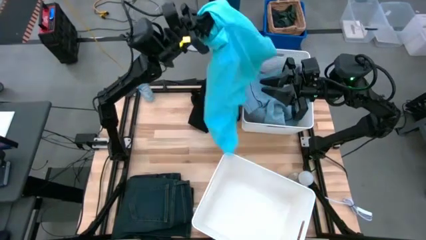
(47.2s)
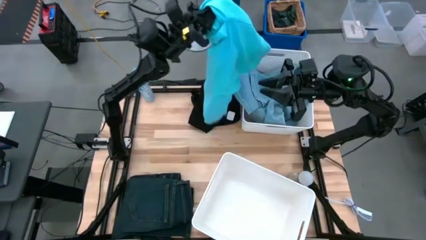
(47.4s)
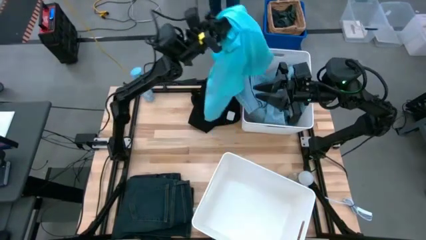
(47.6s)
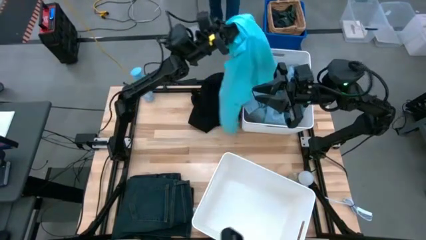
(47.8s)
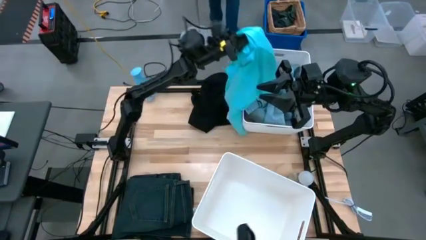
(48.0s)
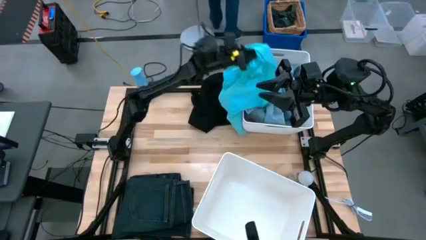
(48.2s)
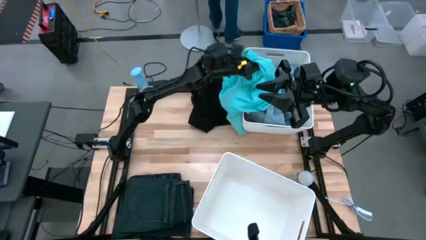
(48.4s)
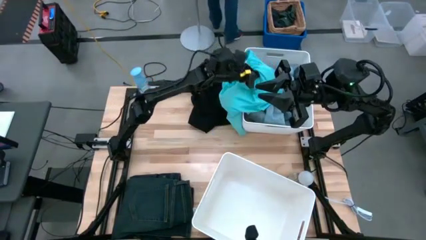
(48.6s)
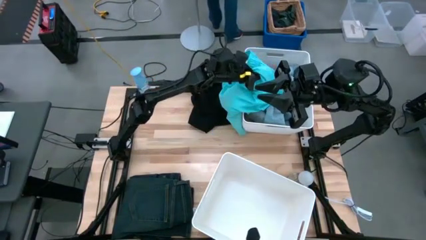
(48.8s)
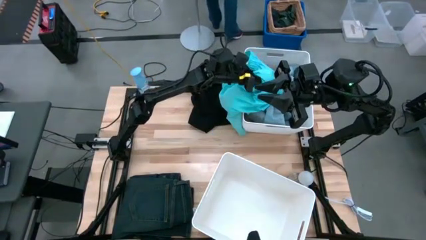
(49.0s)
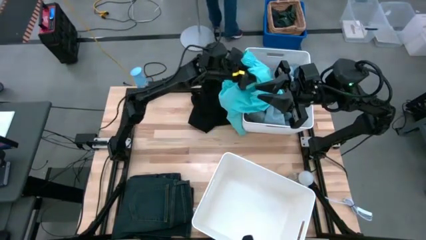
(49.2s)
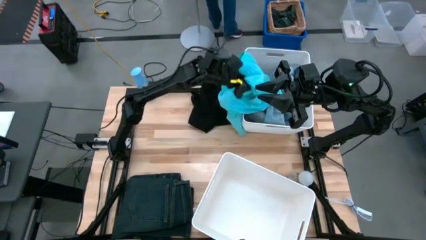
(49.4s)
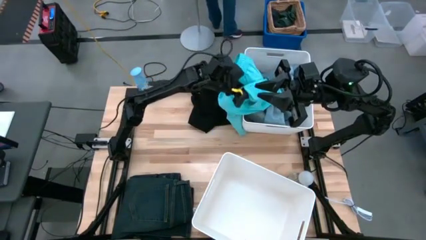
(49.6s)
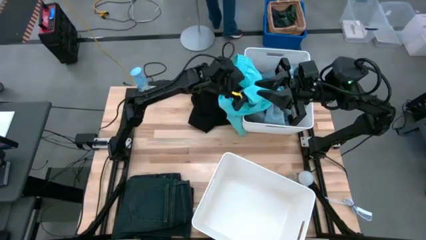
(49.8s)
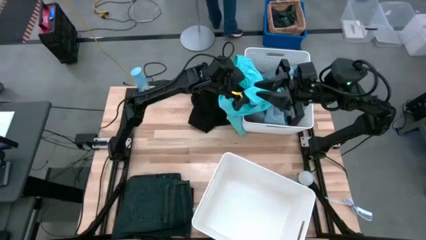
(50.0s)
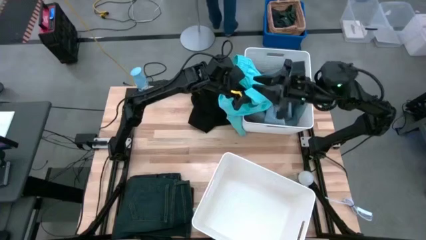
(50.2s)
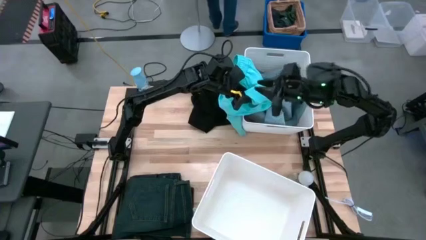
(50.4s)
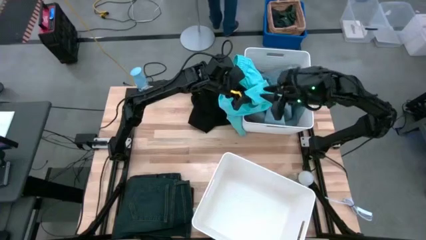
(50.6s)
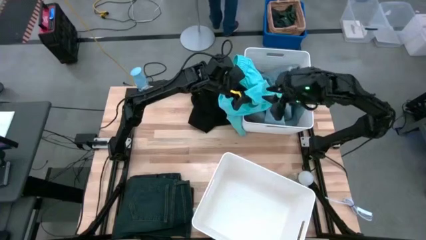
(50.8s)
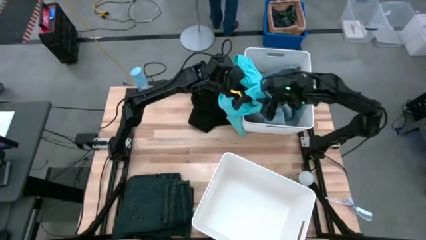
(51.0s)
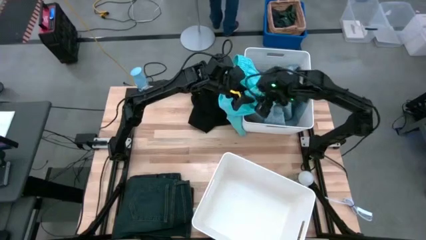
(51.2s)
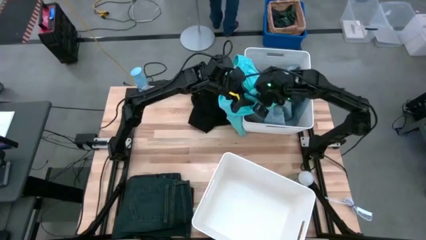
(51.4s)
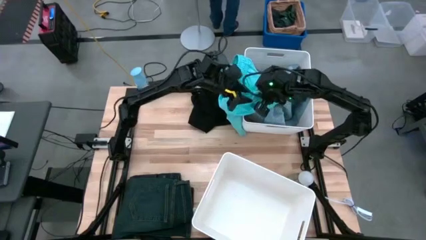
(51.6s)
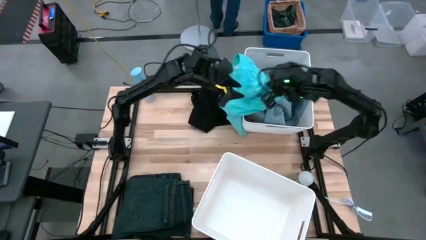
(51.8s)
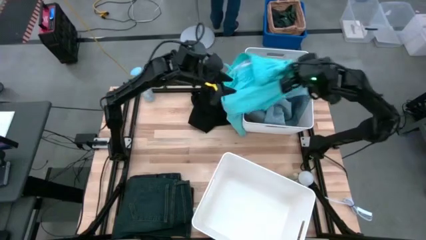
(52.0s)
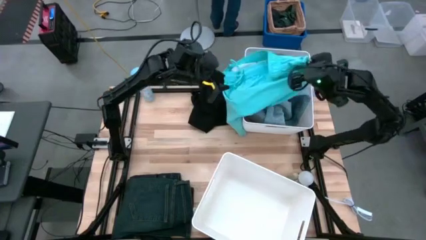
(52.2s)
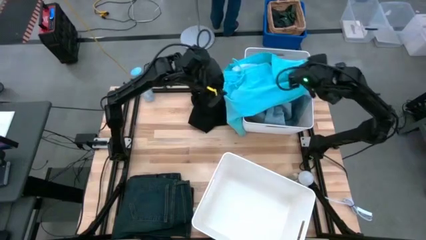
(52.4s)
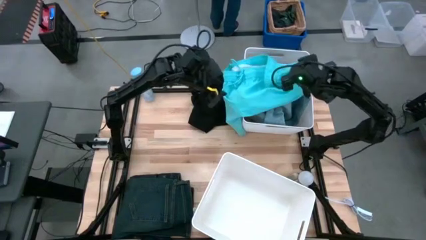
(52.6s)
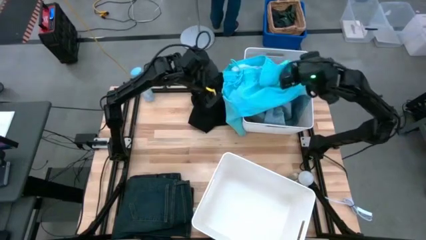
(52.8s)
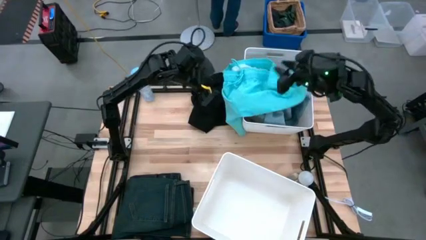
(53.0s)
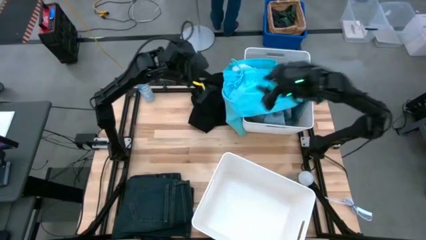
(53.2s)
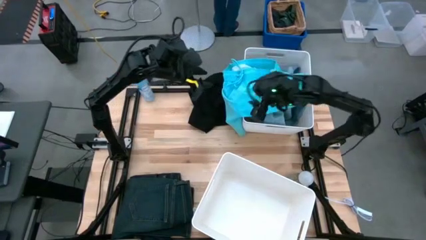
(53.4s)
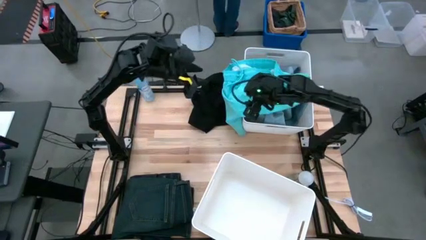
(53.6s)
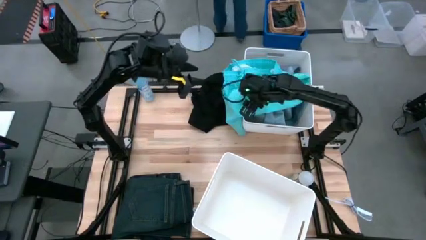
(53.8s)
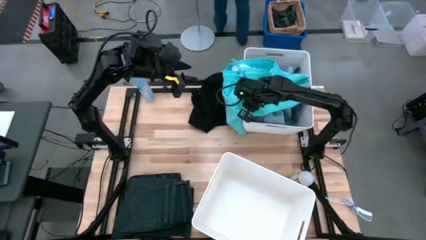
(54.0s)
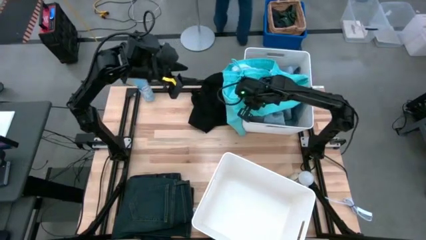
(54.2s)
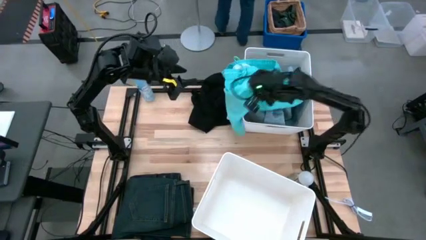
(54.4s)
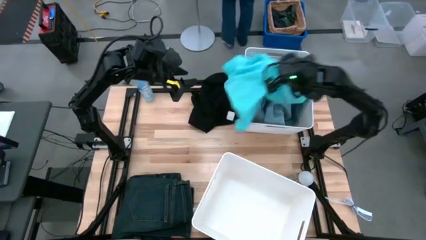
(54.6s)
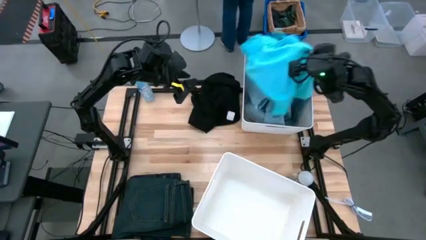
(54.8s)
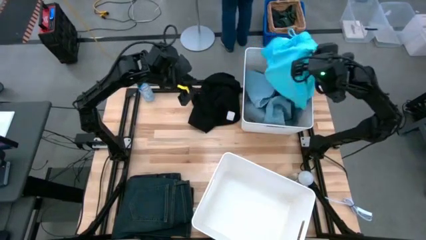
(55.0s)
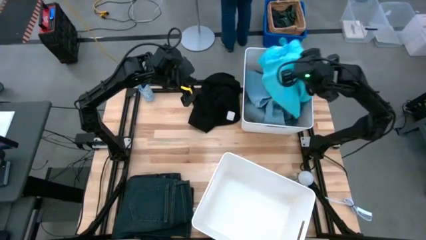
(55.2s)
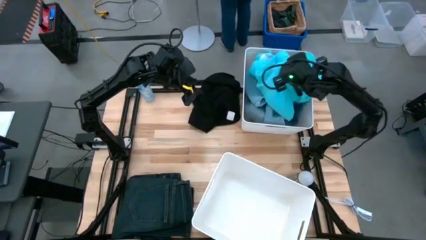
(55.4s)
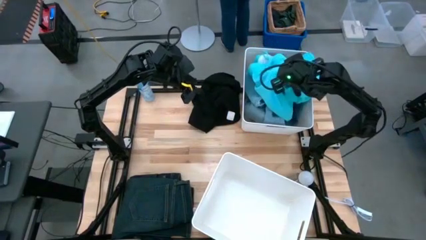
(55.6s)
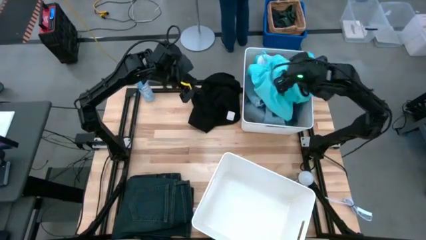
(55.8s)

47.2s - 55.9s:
Task: Sort clothes
Put the blue shorts into the top white laundry bin

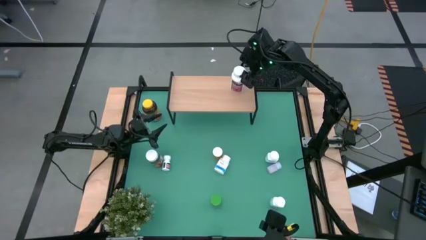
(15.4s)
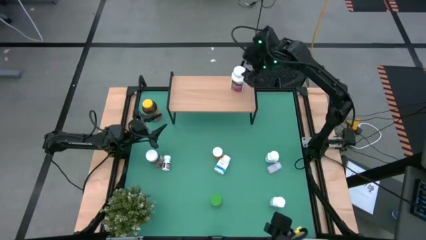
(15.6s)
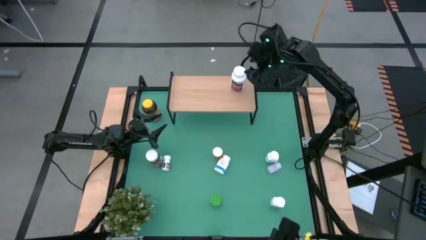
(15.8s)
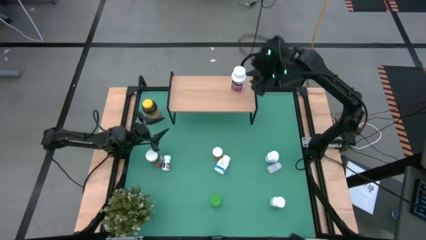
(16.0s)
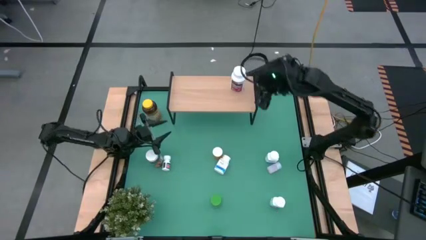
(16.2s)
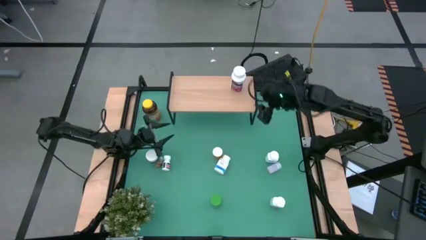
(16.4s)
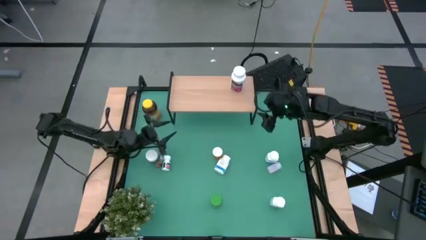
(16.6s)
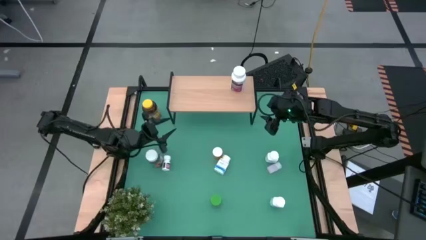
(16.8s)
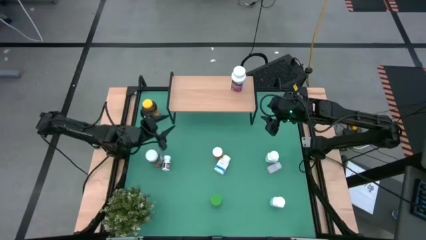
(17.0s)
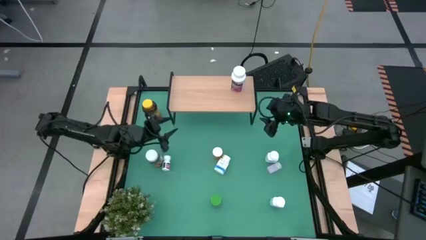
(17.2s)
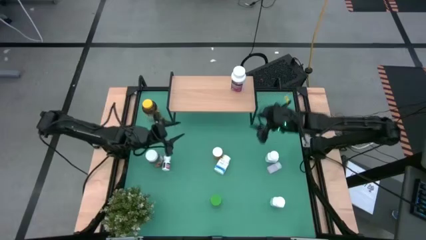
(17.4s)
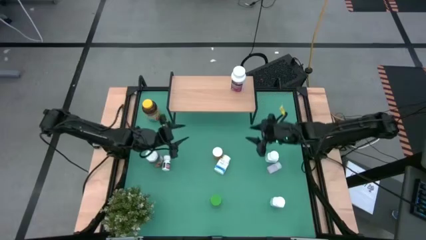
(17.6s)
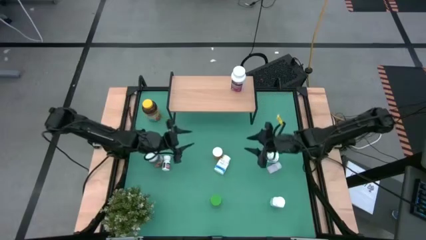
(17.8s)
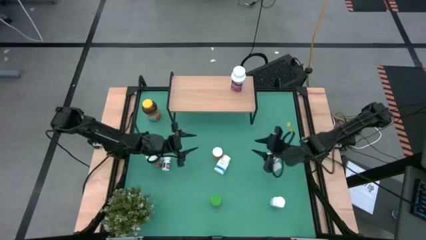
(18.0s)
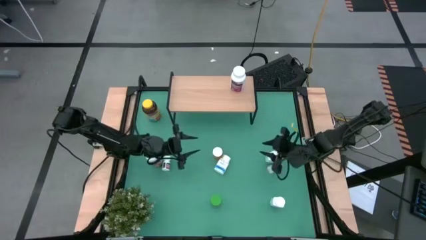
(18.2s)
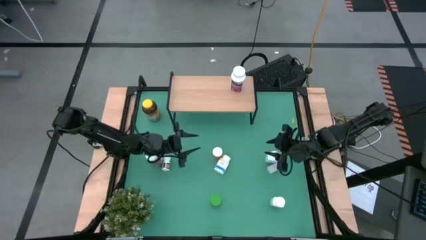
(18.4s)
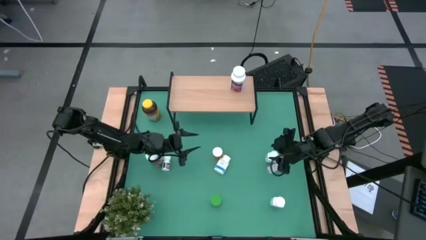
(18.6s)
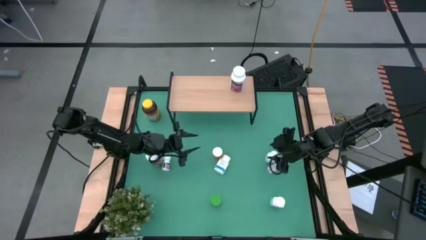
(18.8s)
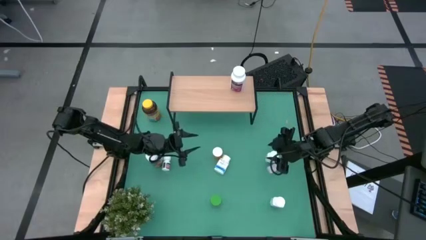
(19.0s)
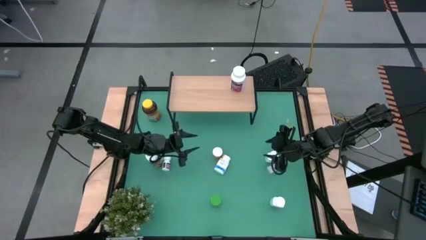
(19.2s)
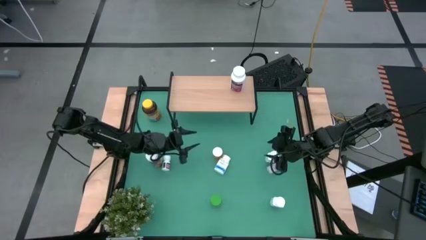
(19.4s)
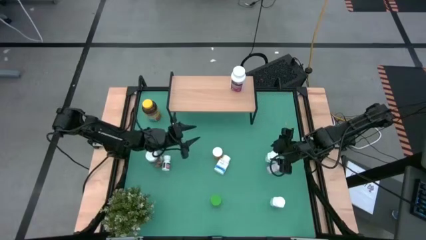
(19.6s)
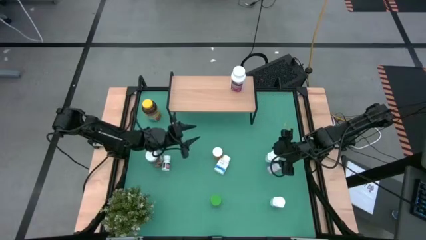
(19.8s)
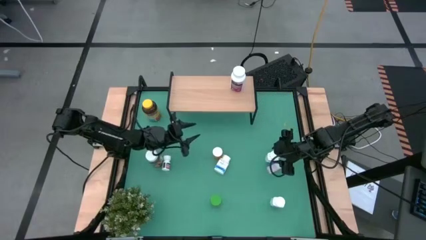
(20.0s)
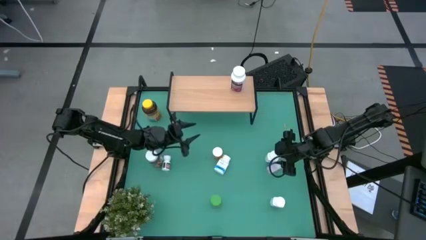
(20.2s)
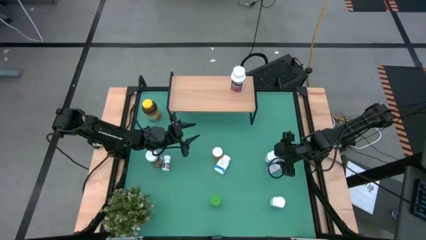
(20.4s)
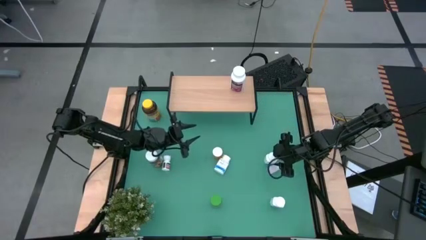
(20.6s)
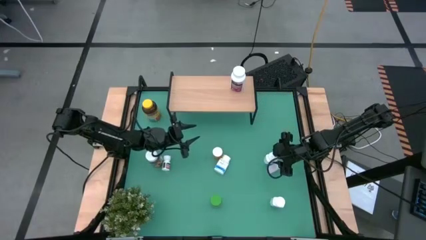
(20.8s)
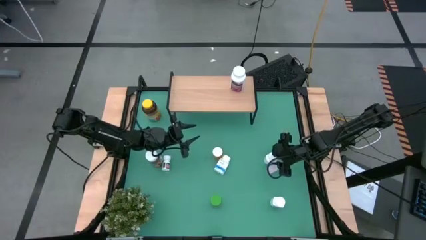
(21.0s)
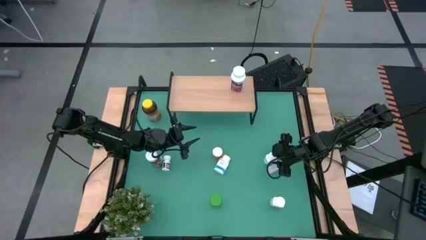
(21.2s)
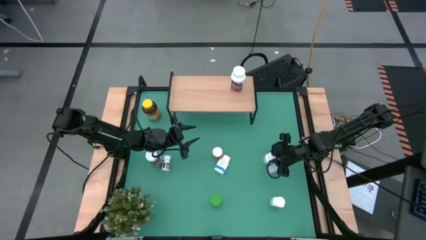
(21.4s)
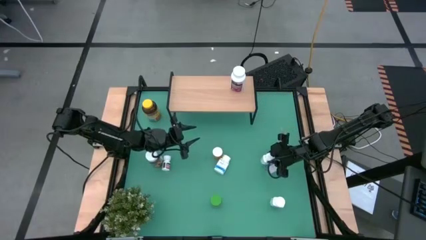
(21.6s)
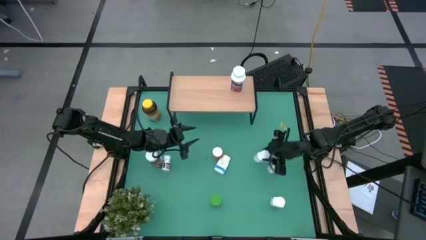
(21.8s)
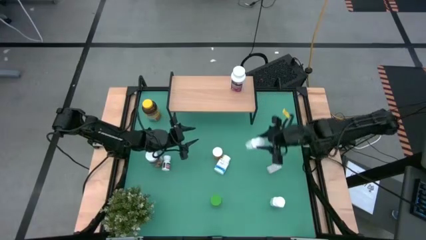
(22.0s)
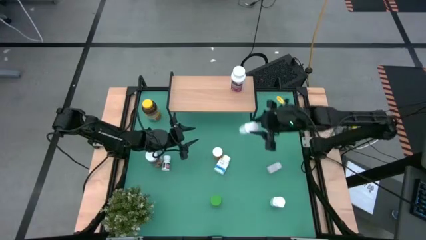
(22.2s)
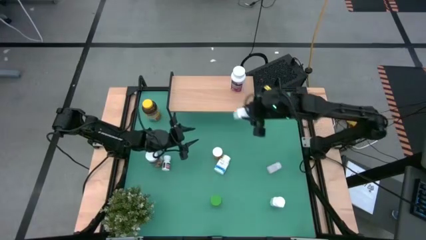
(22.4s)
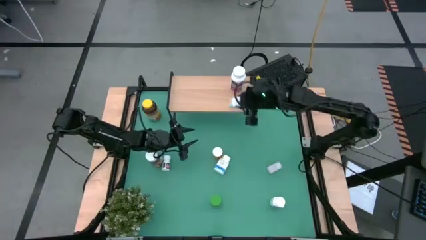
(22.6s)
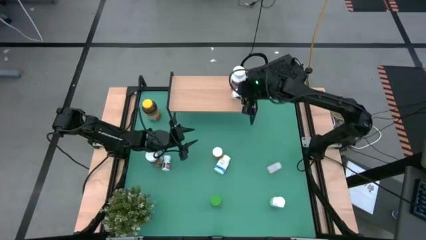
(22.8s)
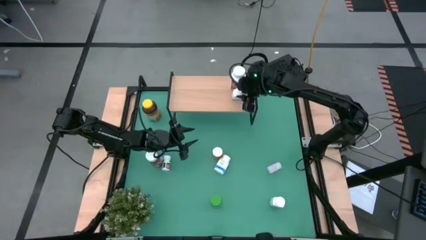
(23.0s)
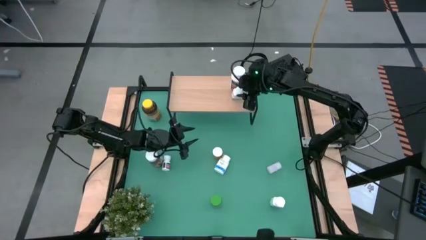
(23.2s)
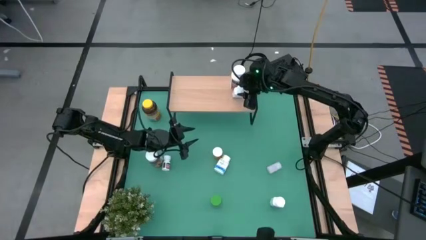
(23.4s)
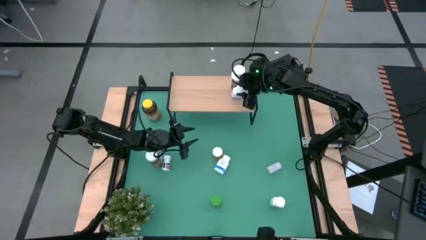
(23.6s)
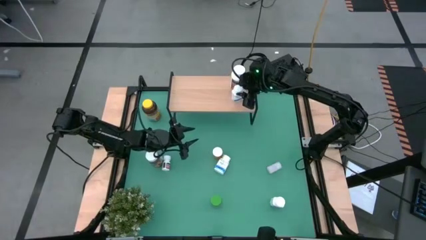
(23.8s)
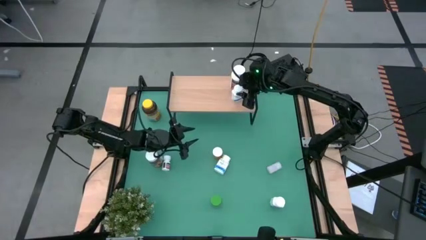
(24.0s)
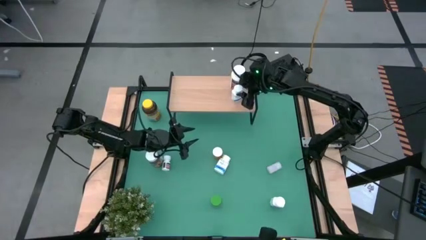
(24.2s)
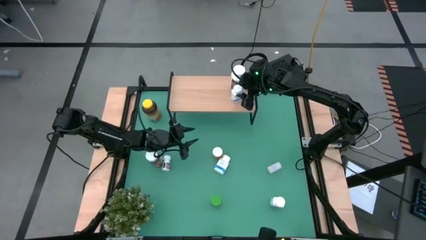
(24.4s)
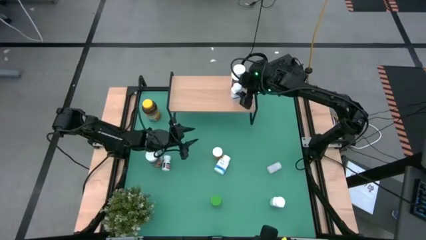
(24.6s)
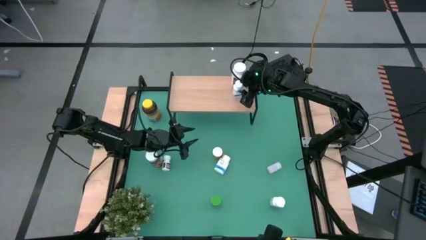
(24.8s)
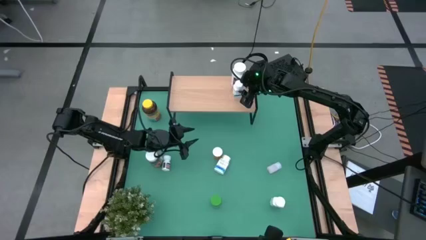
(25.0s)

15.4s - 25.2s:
Task: Pick and place medicine bottles onto shelf by color
Put the right white blue medicine bottle on the shelf
